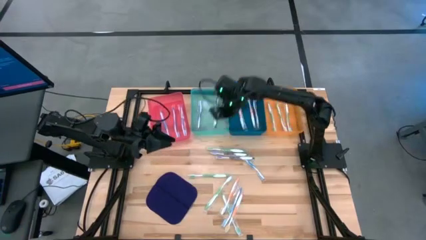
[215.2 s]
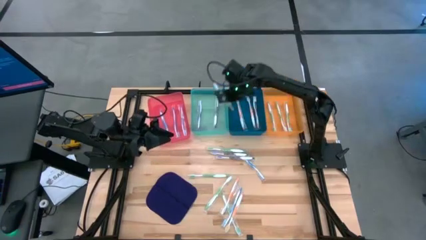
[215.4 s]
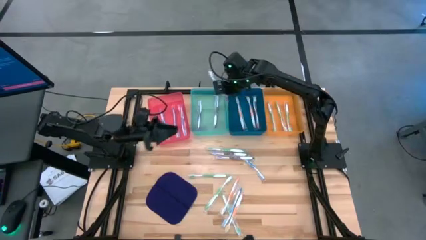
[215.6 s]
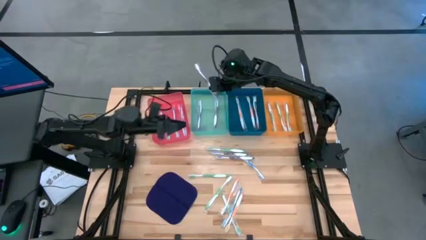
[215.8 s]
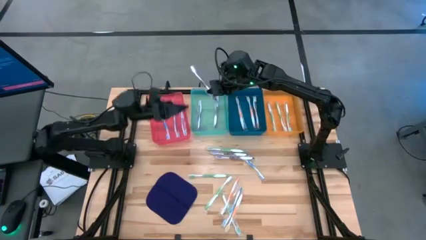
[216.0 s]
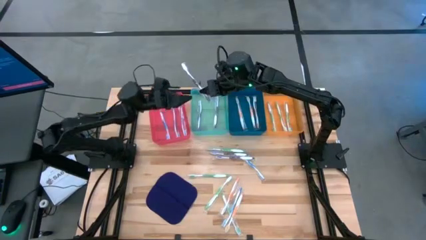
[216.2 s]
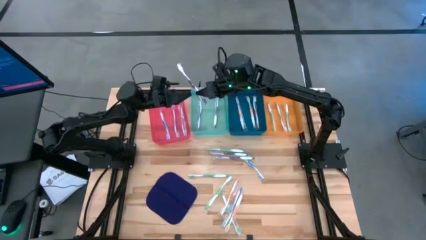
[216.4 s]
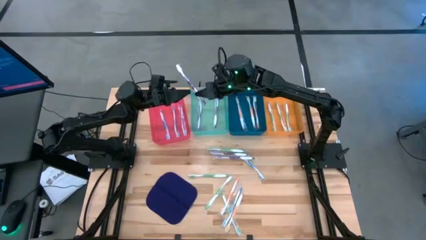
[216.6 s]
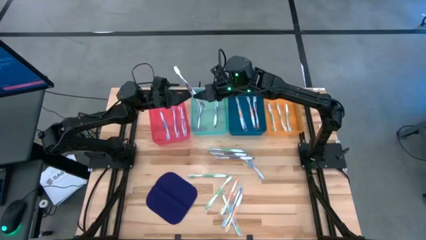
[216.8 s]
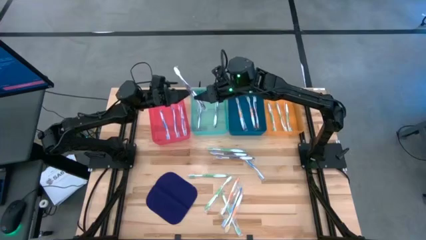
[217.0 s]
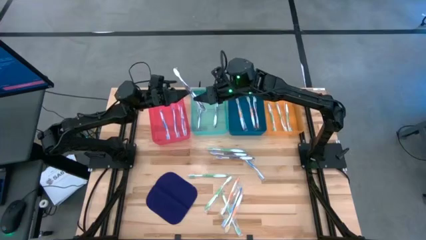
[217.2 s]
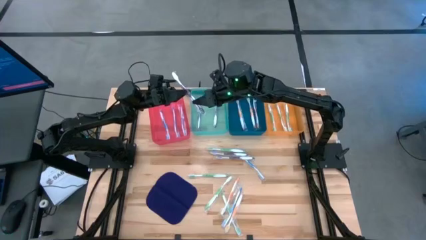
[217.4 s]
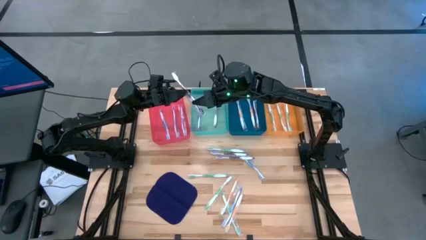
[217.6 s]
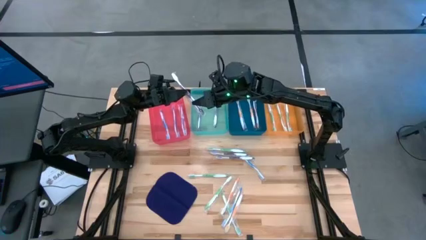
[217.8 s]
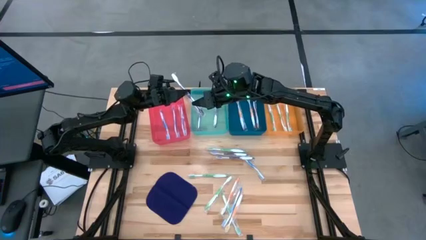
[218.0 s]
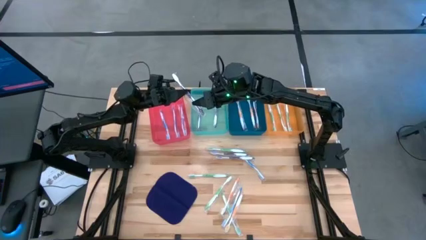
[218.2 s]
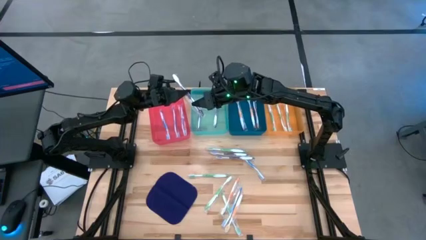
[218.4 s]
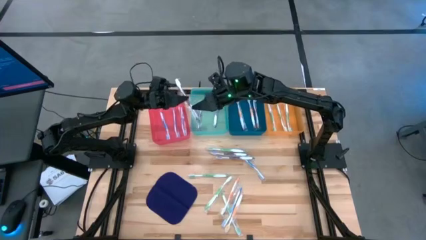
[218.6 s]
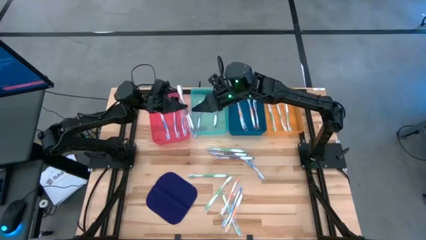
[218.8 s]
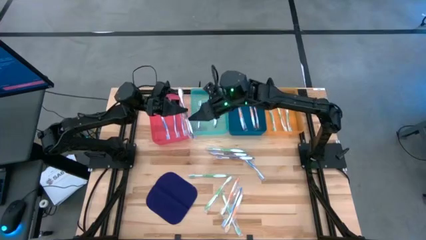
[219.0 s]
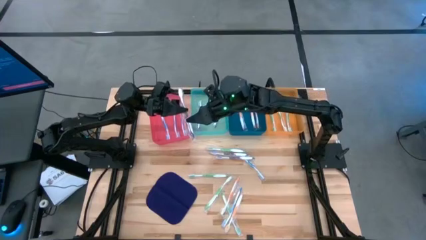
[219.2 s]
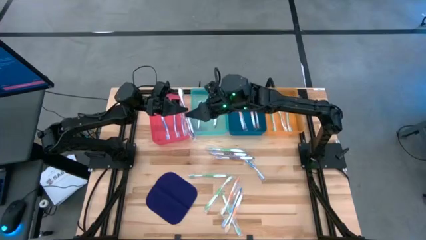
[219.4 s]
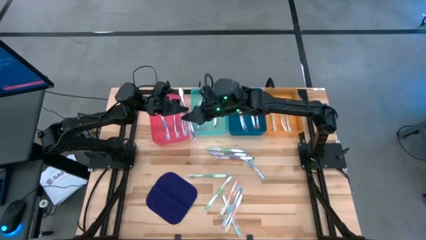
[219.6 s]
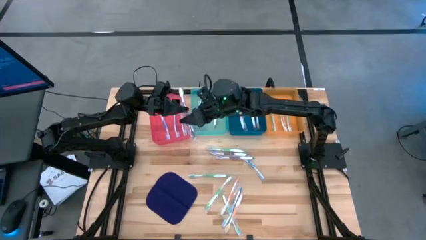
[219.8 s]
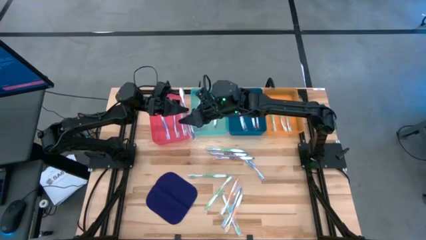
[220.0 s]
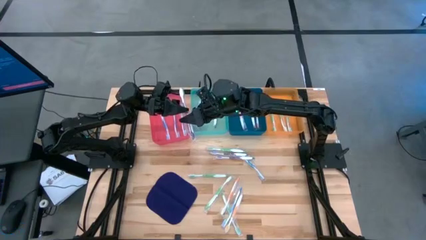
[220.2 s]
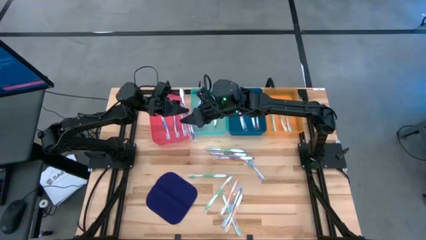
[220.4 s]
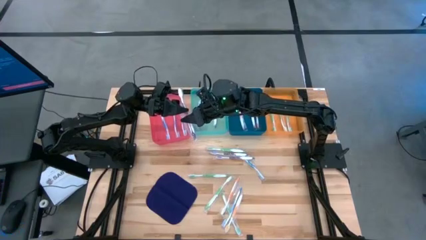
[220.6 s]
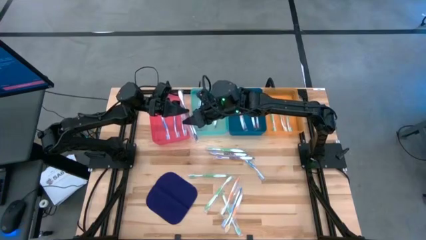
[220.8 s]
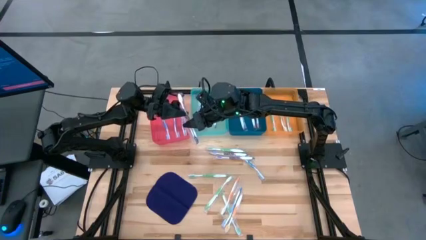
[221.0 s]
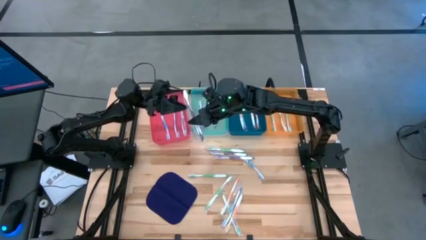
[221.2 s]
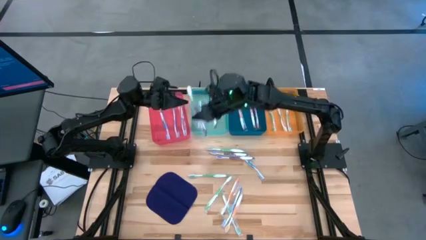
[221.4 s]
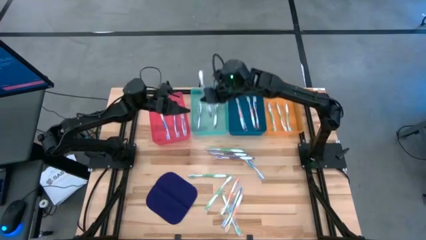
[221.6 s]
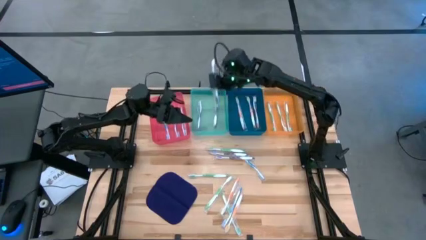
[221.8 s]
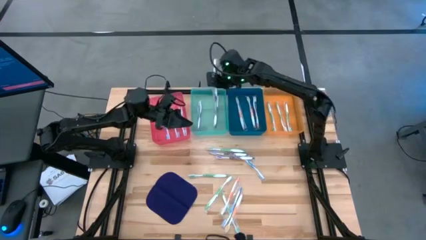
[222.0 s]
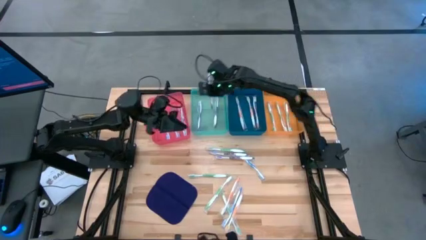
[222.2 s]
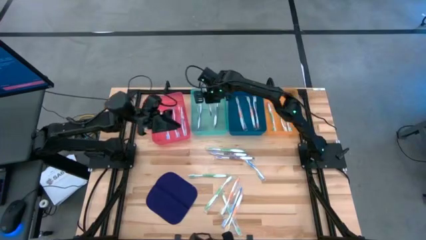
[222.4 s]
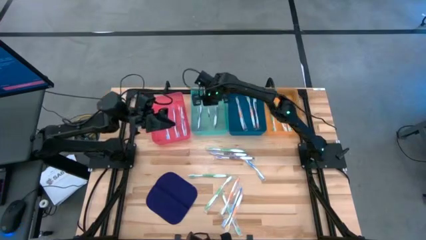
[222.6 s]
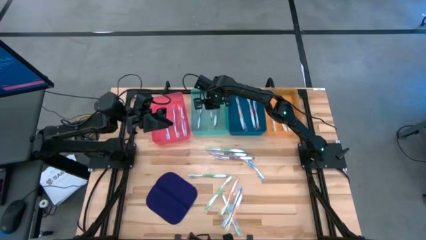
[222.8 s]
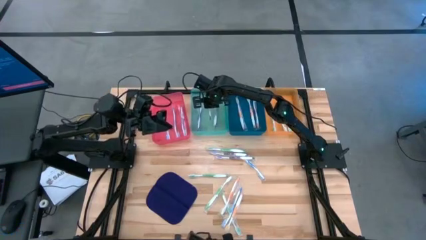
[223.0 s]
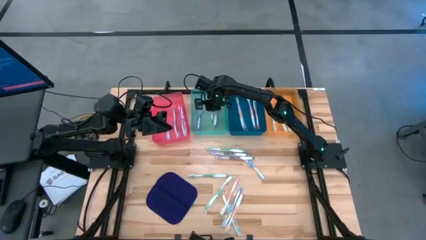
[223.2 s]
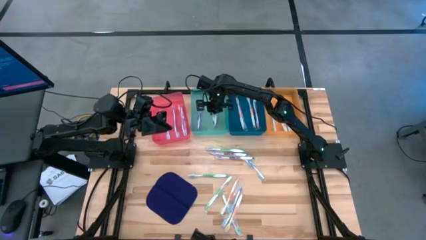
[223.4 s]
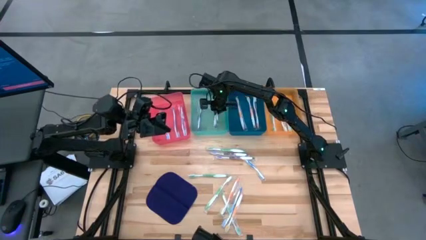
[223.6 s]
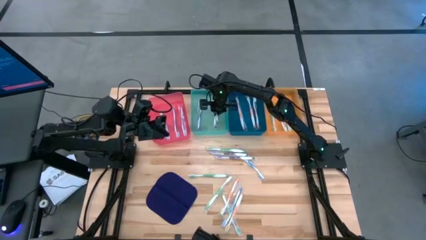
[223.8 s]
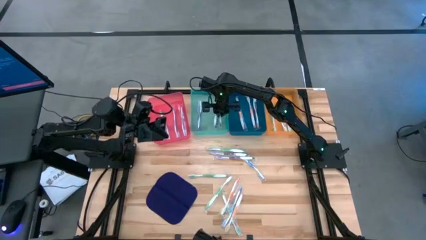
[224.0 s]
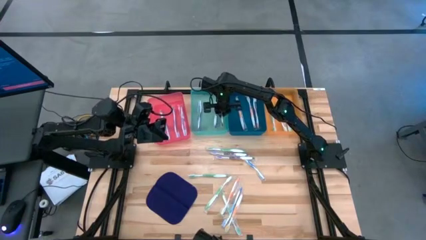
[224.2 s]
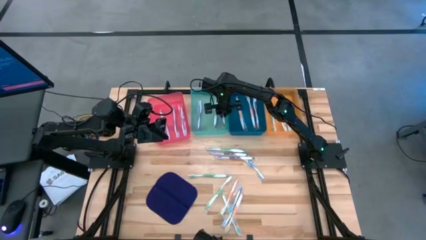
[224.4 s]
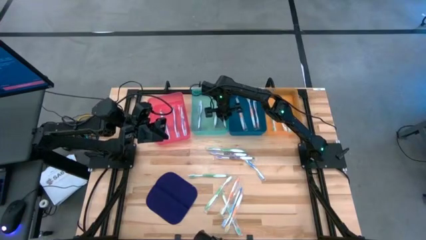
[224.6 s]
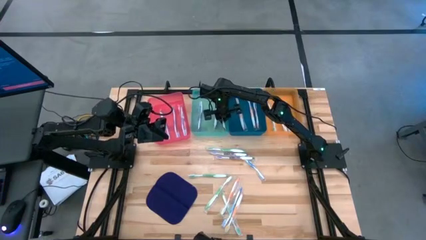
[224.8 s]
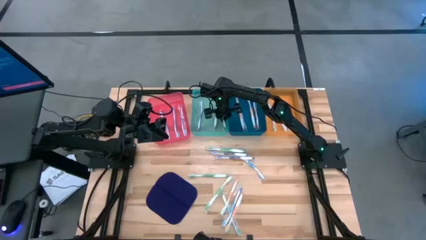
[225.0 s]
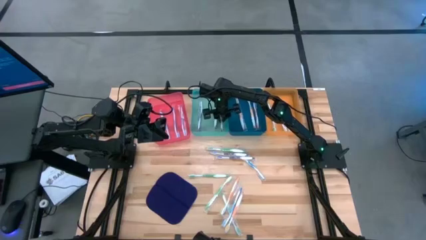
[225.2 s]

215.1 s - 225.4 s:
Task: Pick & Place Toothbrushes
Put the purple toothbrush into the green bin

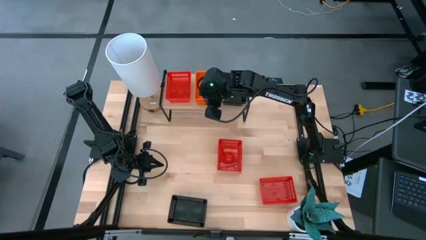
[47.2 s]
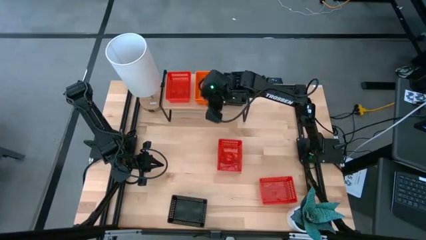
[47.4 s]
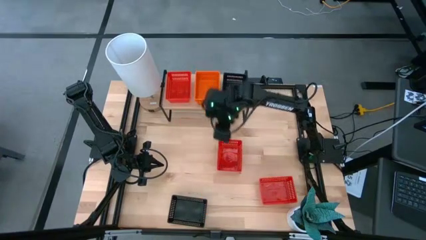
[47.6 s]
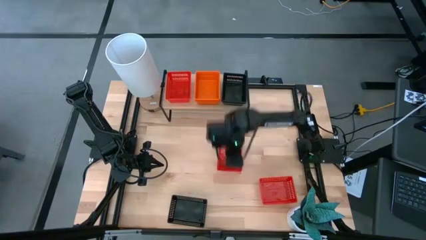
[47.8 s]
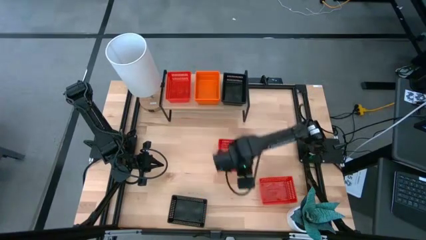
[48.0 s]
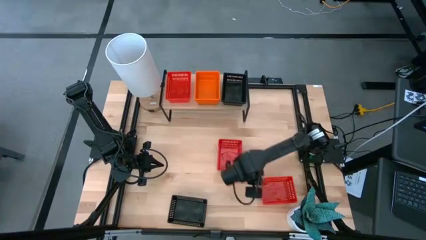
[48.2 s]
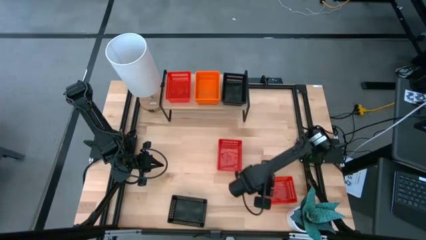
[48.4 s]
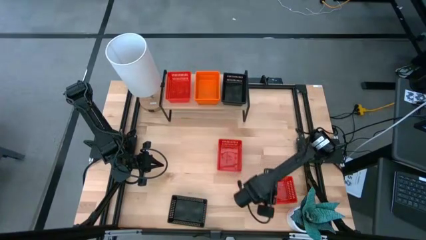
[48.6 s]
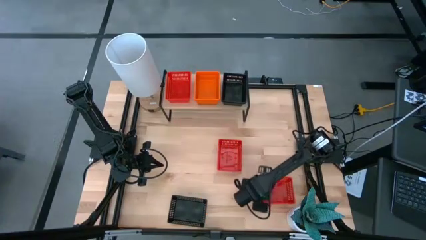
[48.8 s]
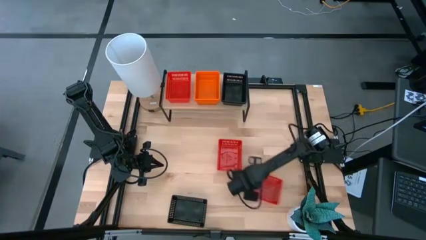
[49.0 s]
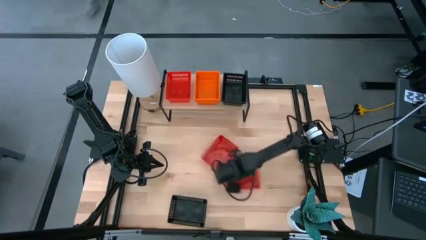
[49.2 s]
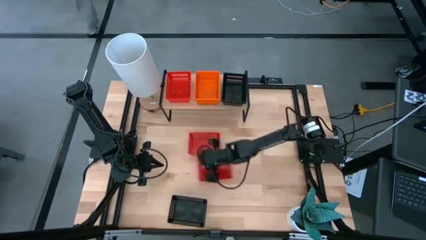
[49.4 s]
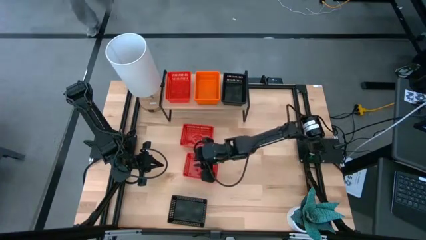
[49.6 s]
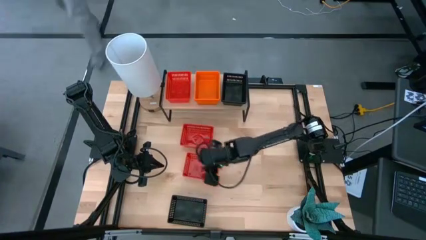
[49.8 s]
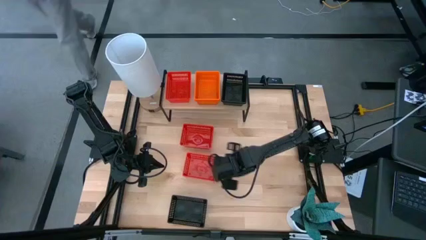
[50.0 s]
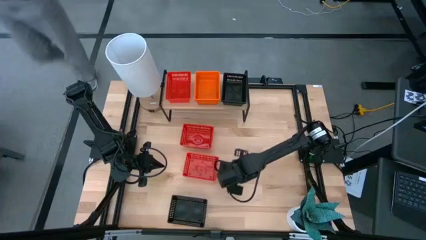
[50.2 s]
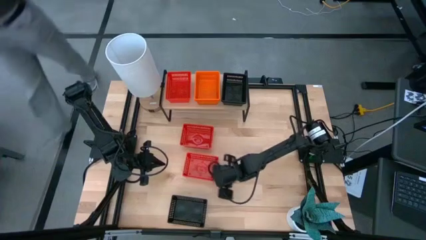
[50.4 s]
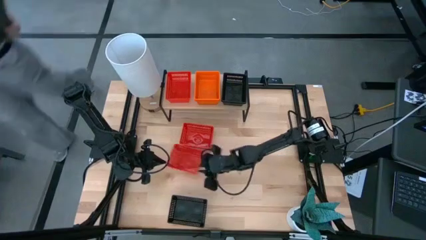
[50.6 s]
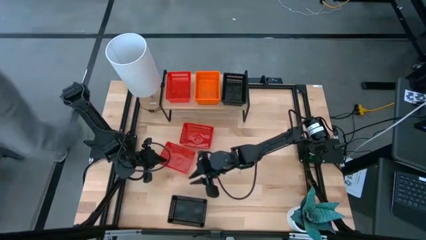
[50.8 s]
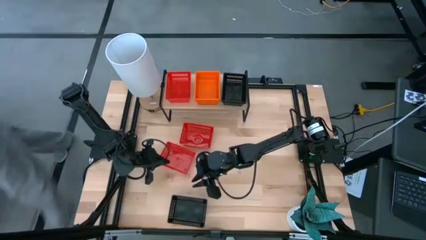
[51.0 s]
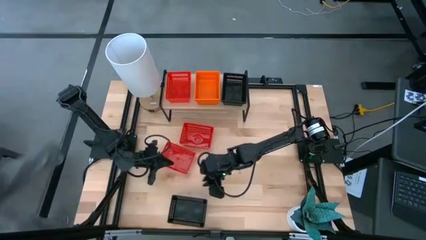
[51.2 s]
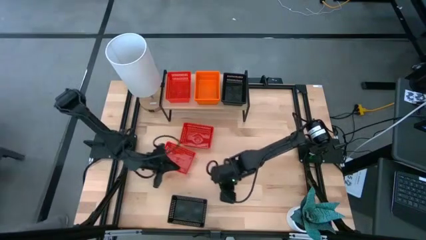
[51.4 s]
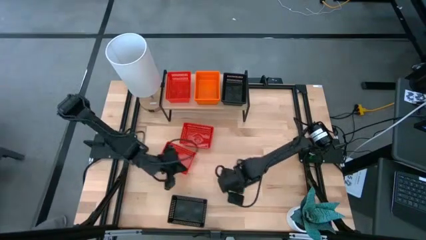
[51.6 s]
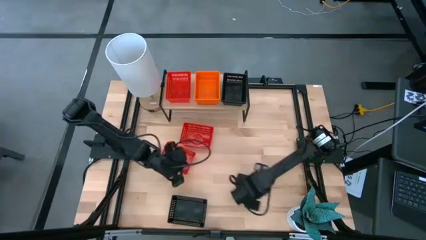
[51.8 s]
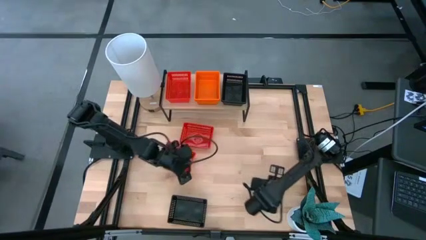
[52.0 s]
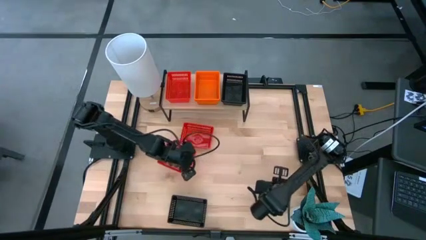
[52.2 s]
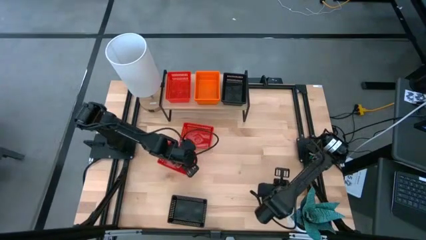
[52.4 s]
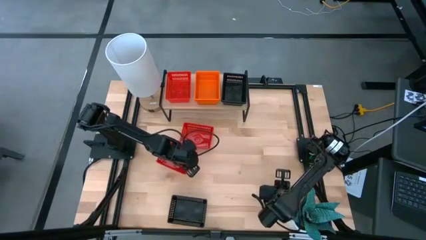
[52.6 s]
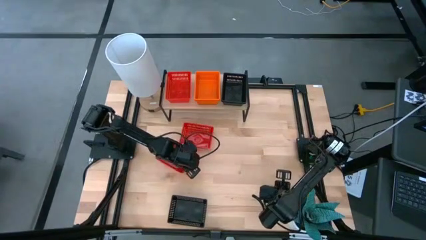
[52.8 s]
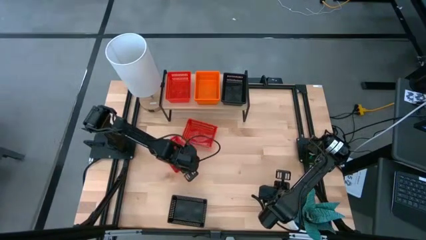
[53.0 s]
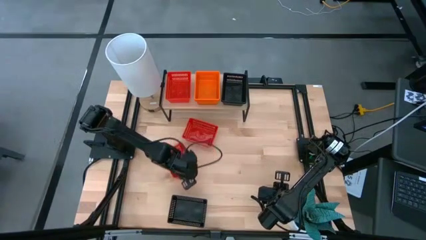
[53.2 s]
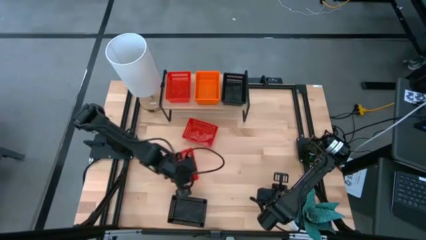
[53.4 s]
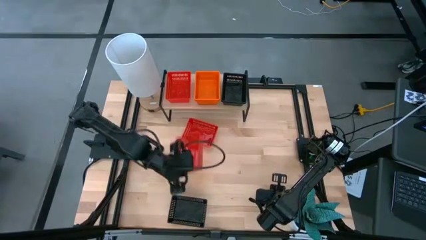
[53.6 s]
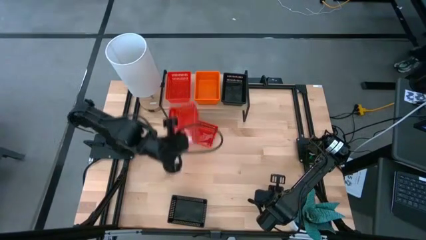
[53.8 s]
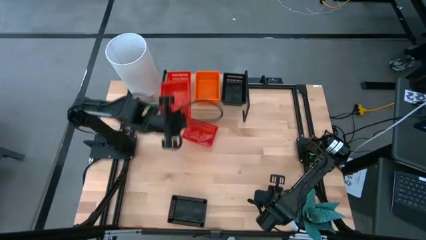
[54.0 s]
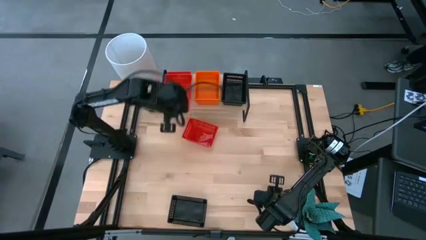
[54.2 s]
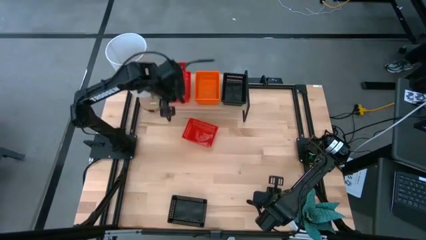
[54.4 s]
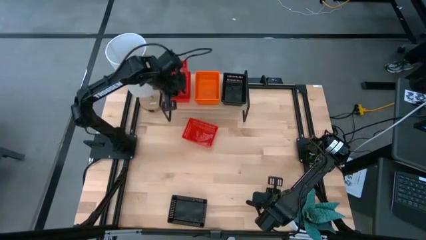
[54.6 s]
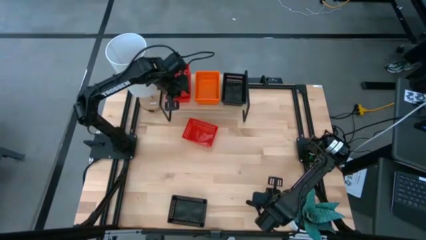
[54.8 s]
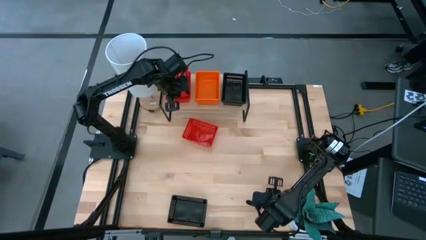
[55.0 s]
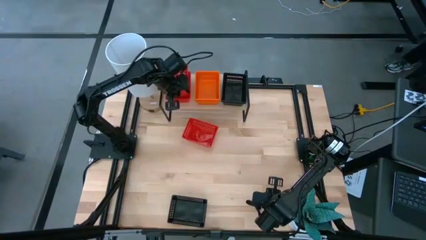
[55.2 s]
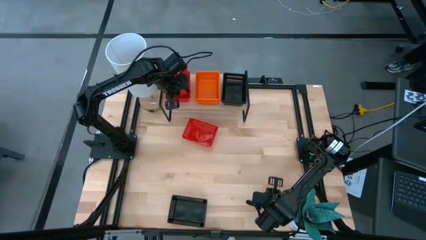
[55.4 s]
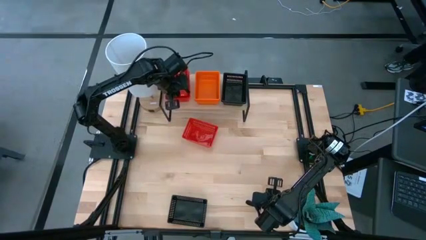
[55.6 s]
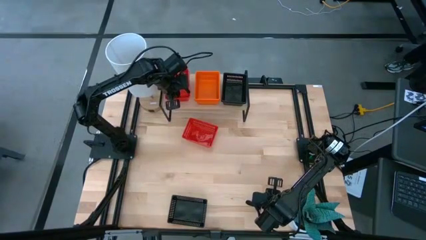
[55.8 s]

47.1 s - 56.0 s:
Task: Stack baskets on shelf by color
Stack the bottom red bin on the red bin on the shelf
